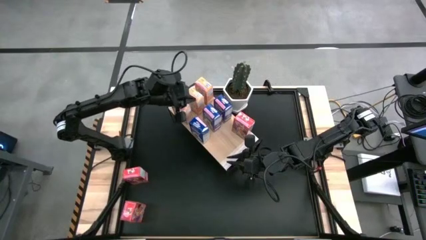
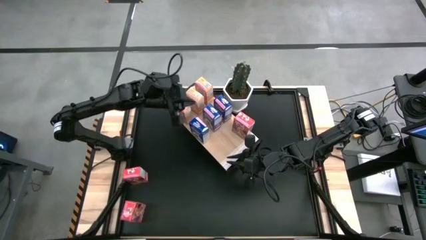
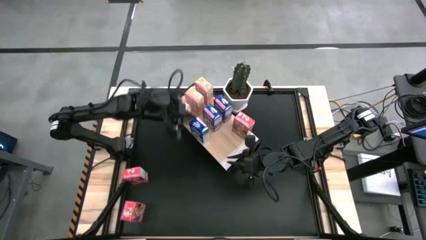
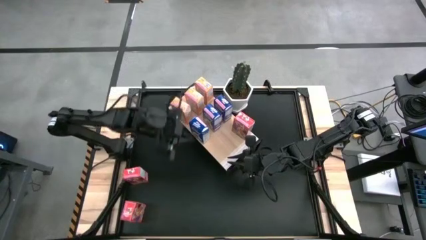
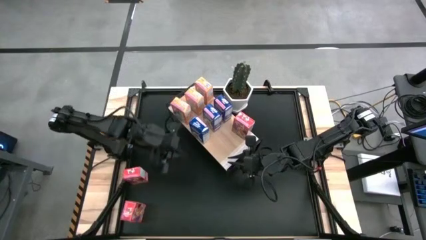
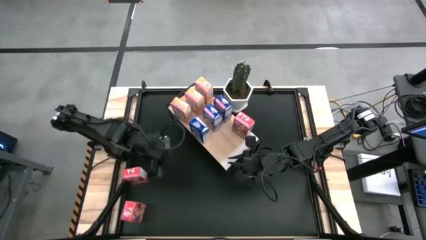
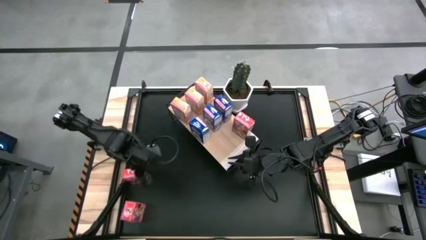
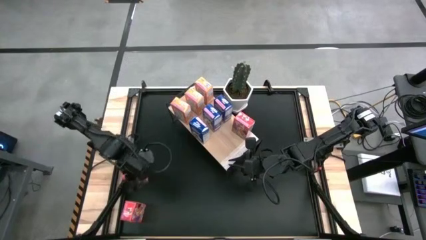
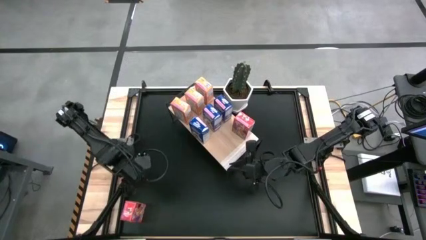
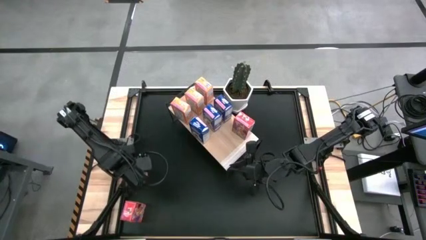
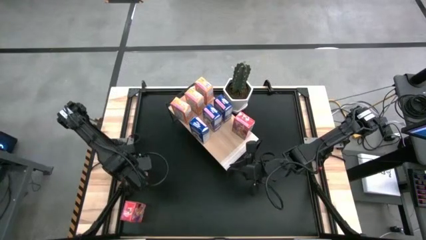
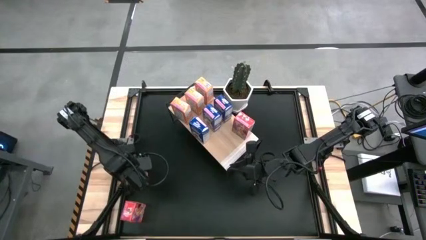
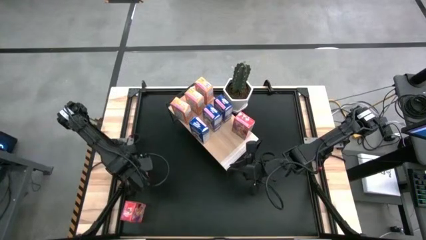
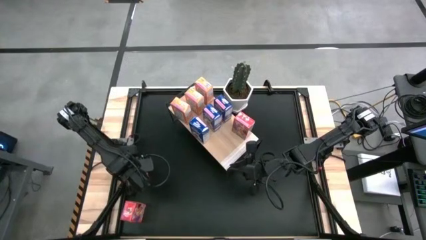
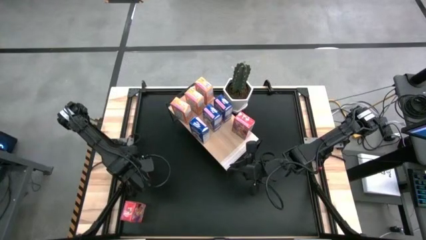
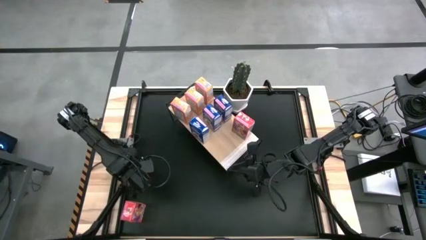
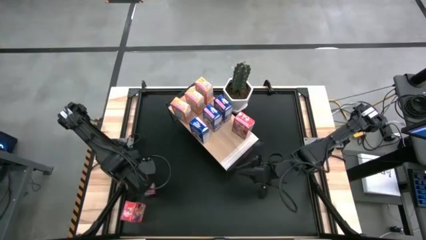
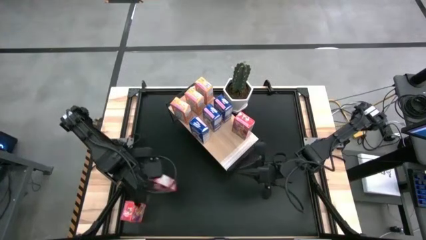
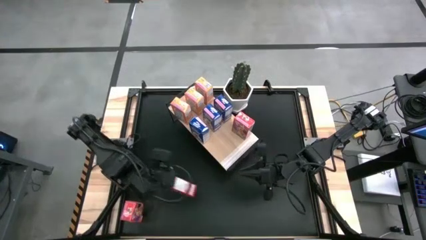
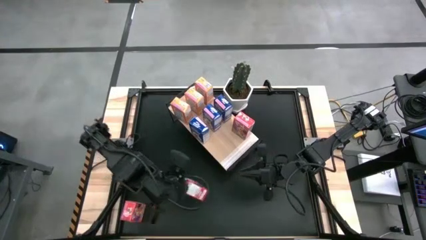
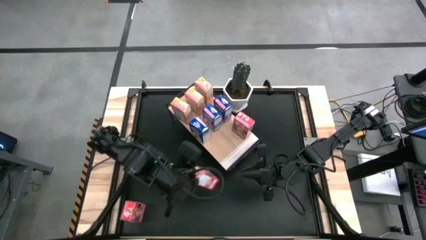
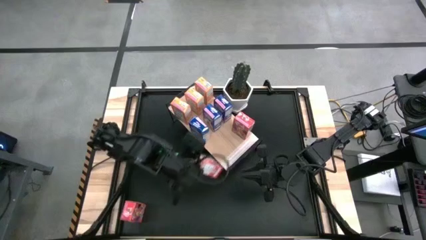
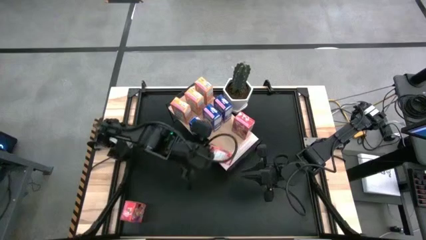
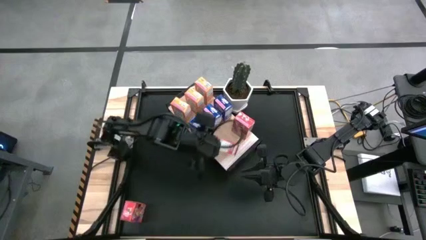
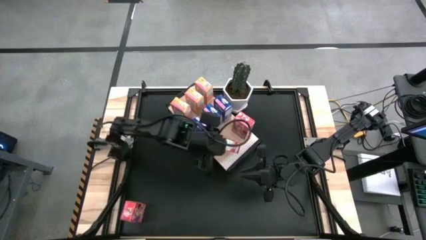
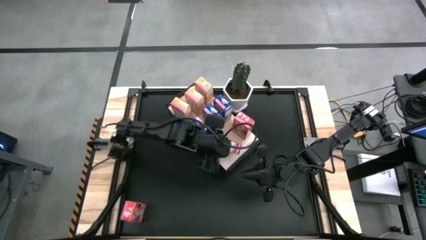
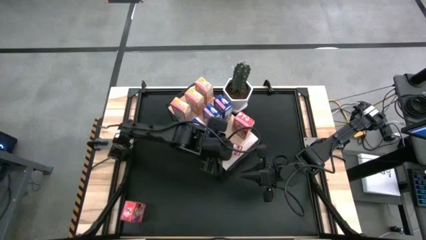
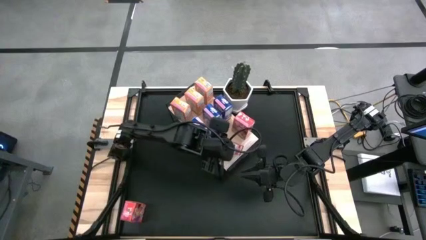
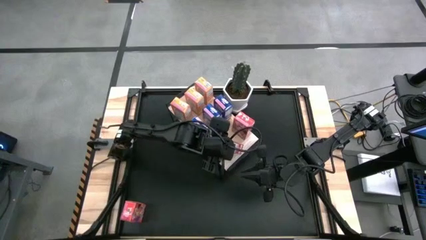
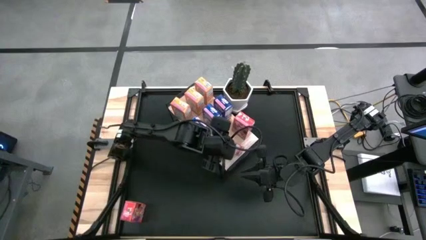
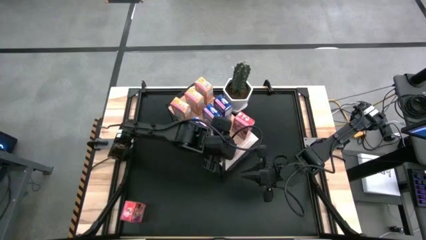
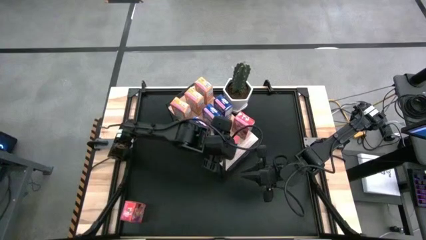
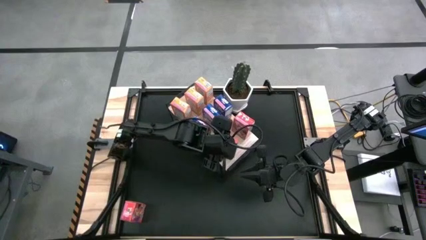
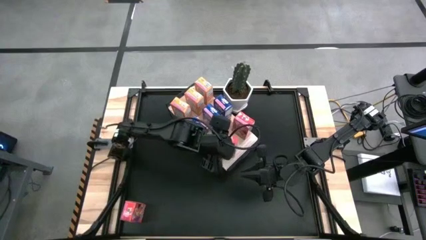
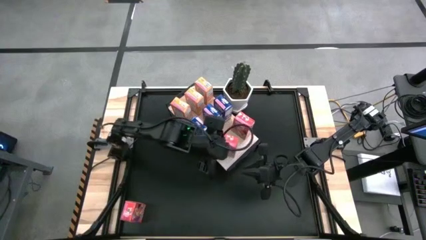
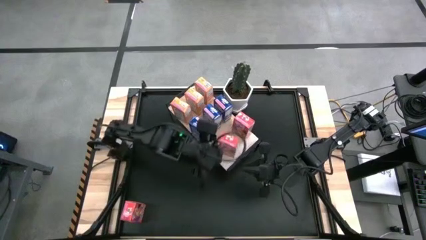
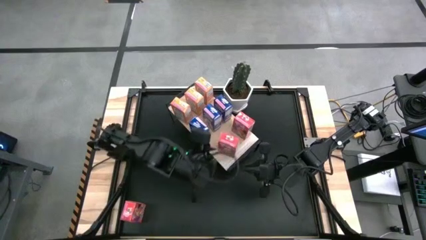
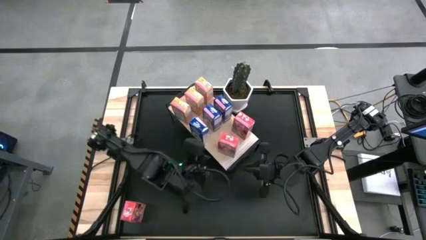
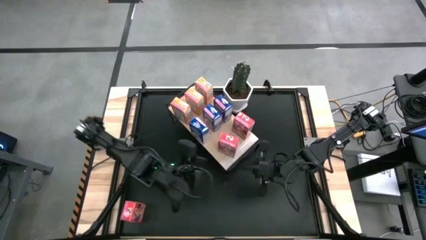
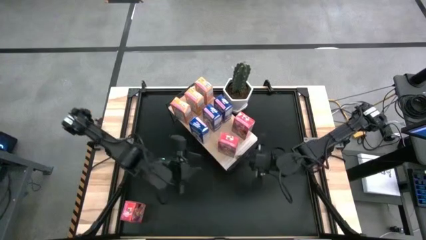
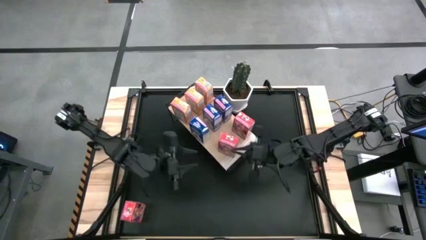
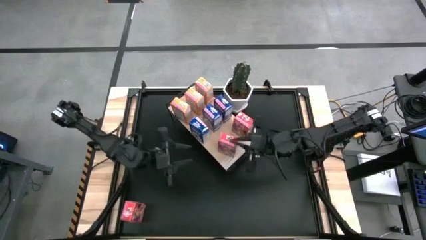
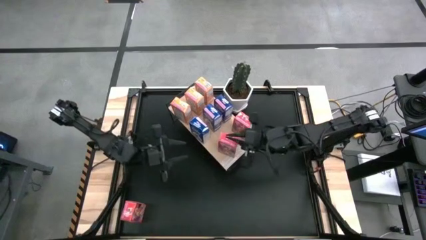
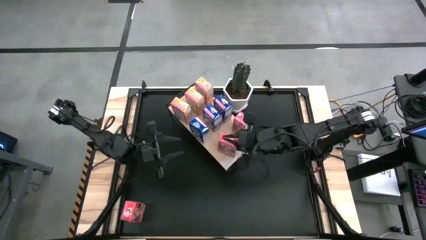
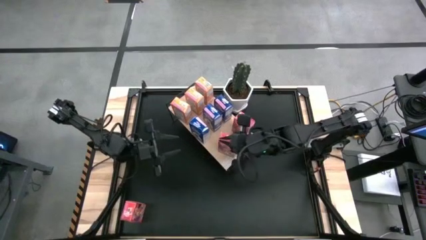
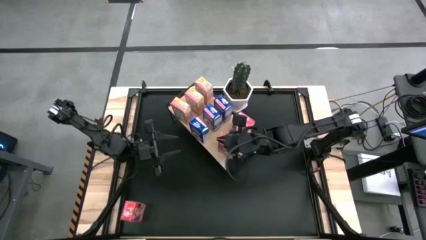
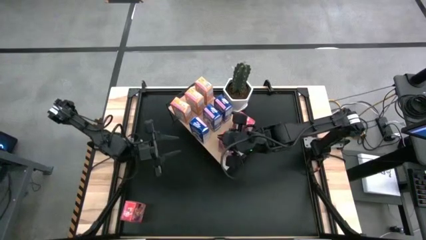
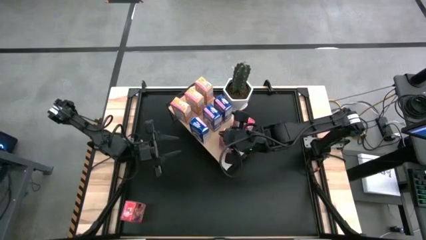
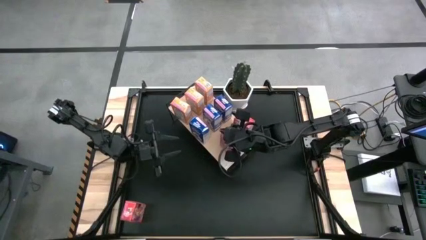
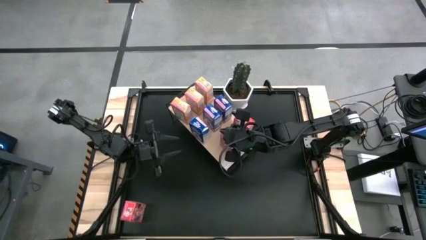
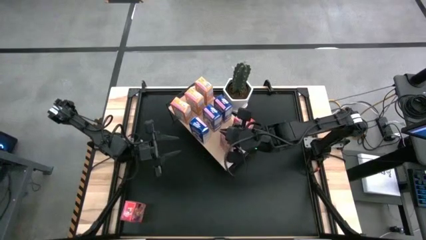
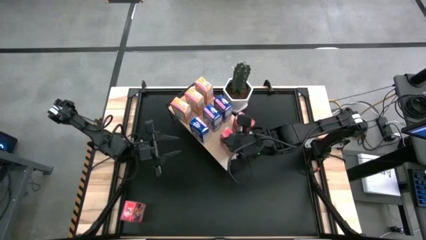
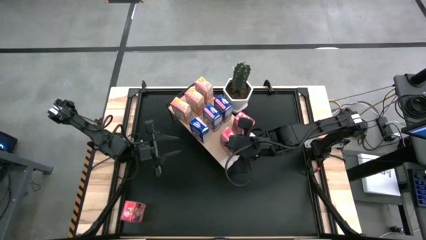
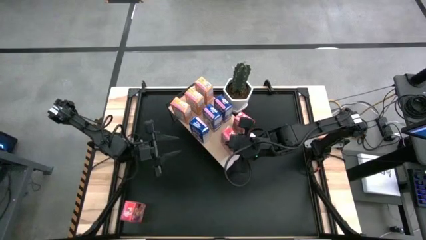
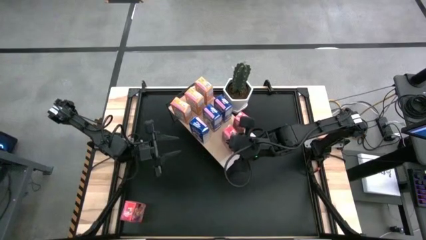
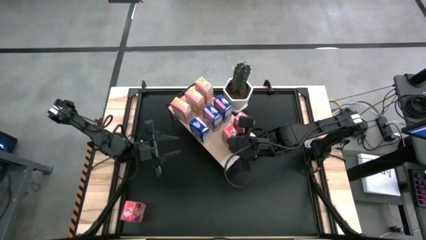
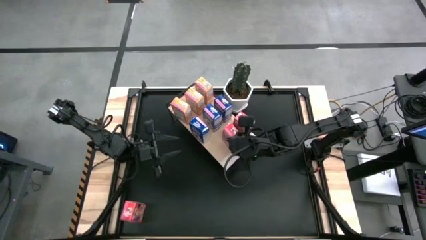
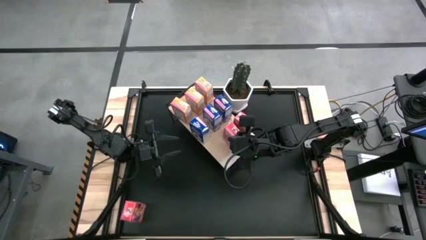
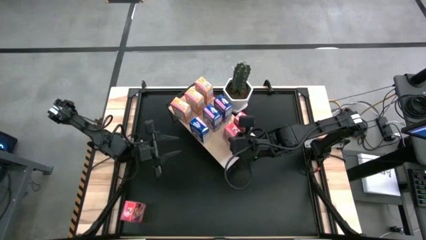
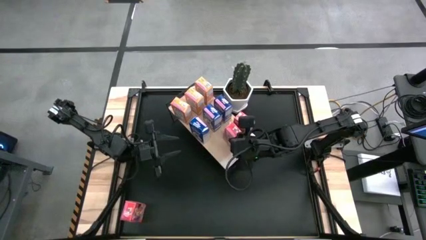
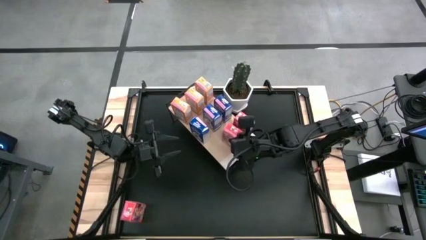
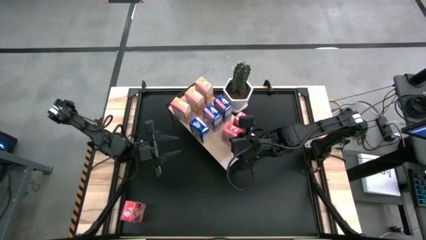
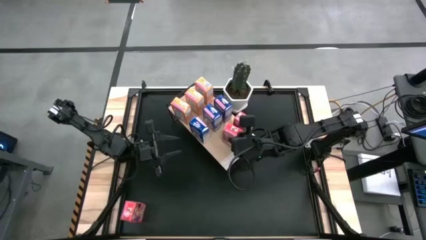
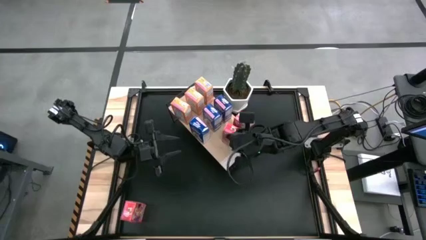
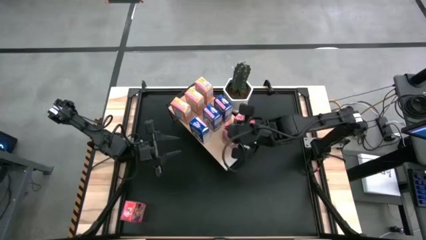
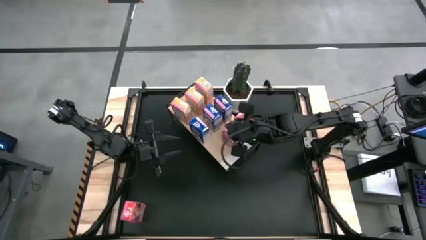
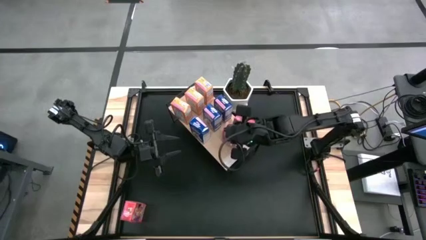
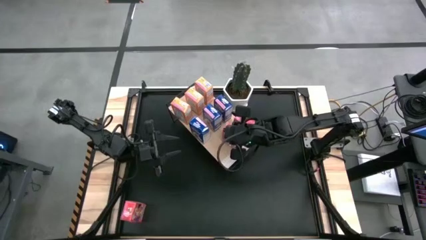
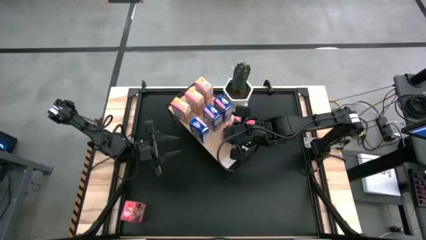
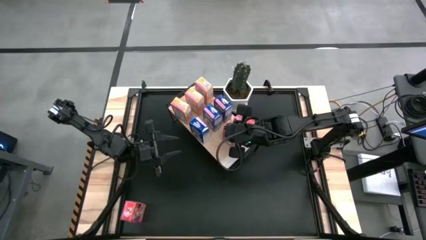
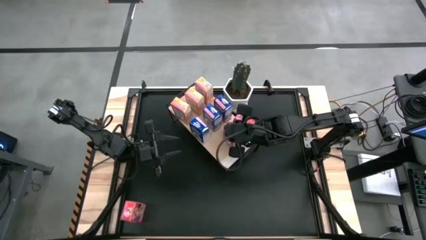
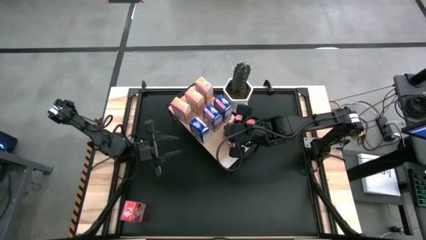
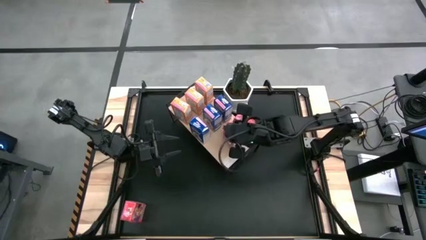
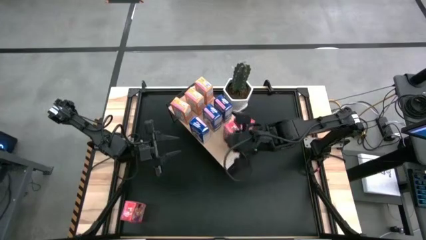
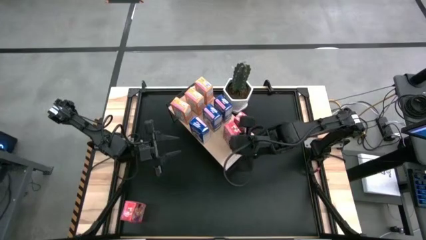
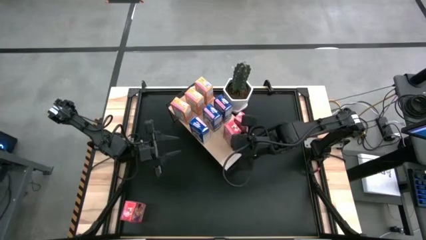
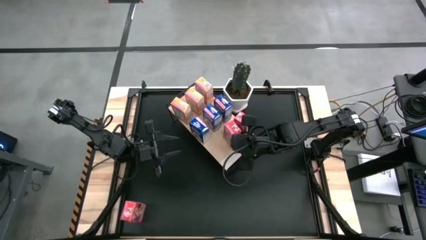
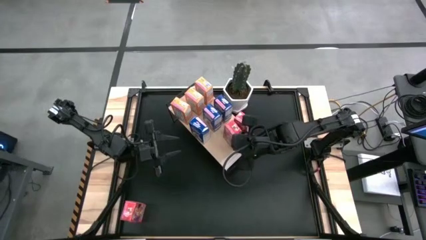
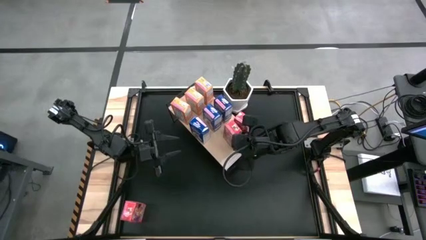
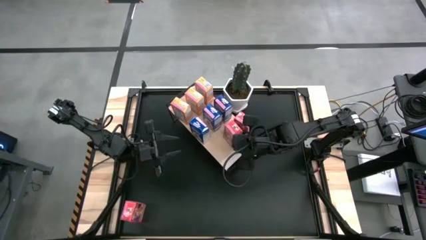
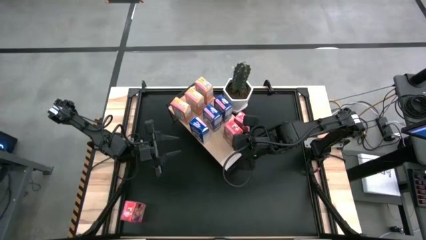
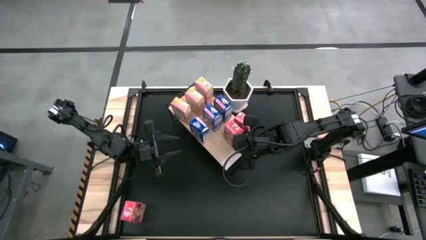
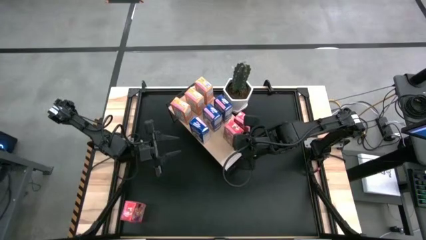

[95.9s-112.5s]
Task: Stack cereal on shelf
Put the top red cereal box on the shelf aligned with the other red cereal box
